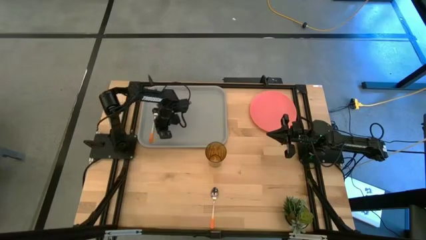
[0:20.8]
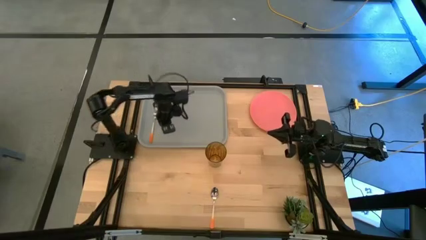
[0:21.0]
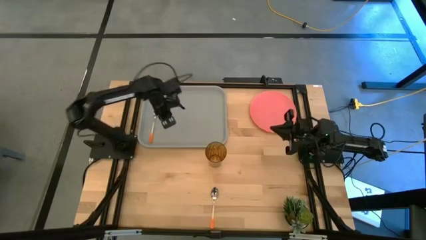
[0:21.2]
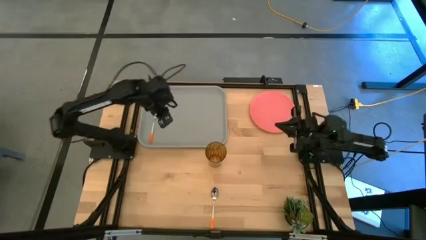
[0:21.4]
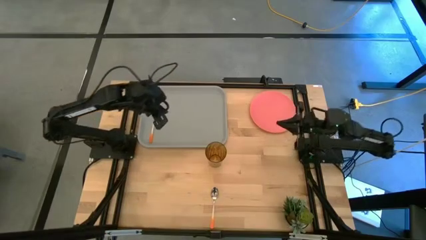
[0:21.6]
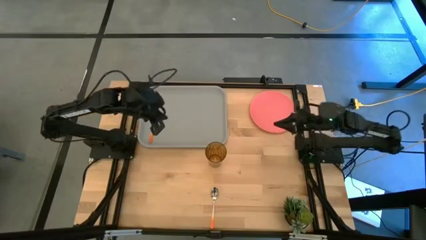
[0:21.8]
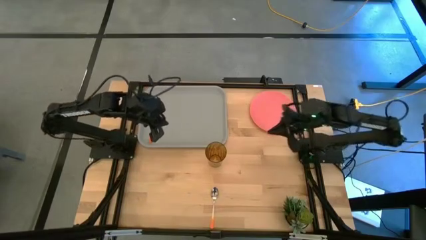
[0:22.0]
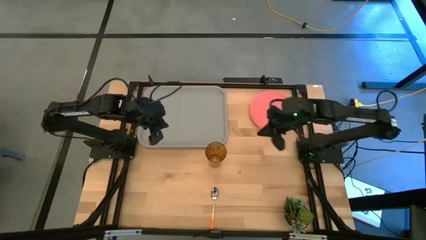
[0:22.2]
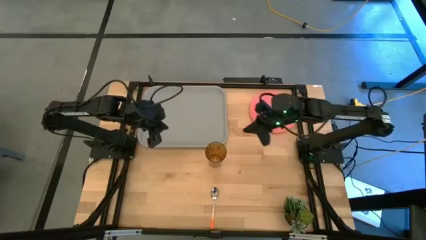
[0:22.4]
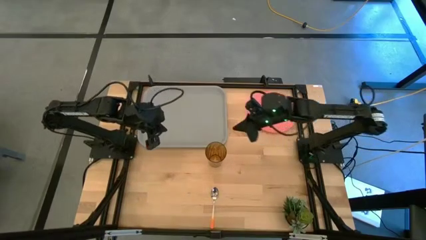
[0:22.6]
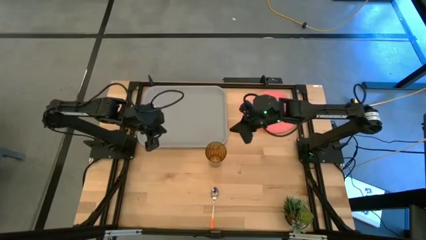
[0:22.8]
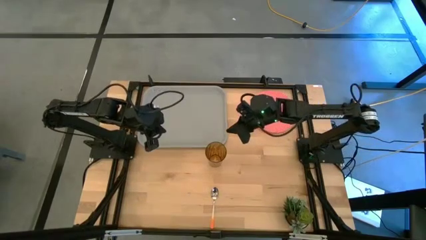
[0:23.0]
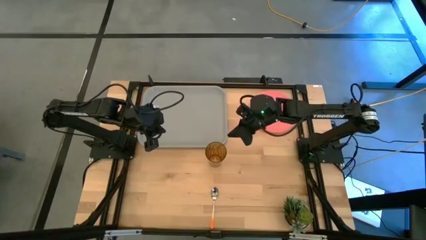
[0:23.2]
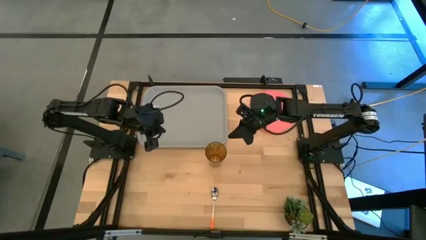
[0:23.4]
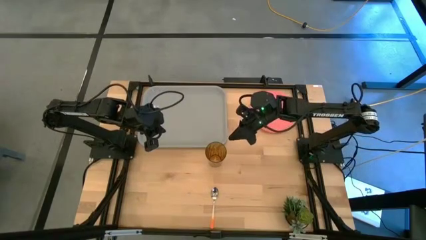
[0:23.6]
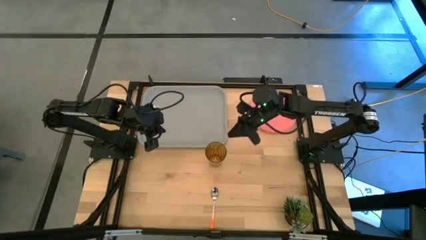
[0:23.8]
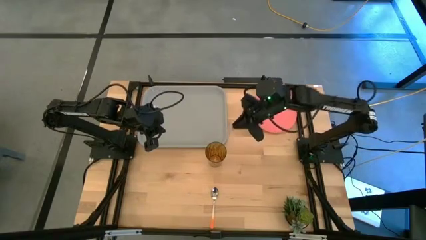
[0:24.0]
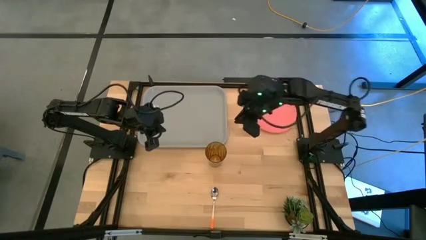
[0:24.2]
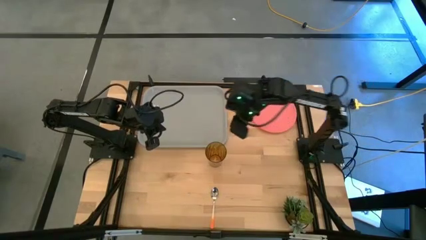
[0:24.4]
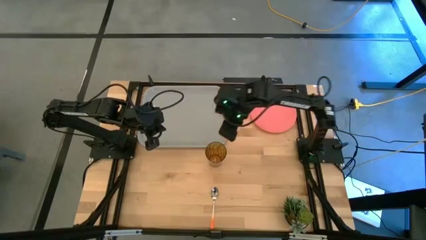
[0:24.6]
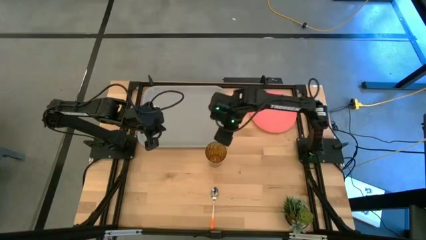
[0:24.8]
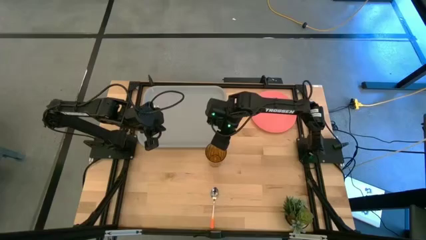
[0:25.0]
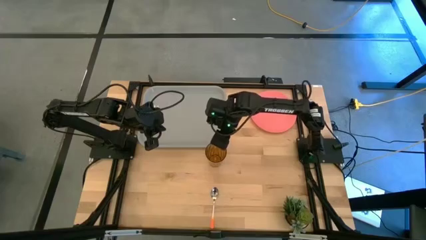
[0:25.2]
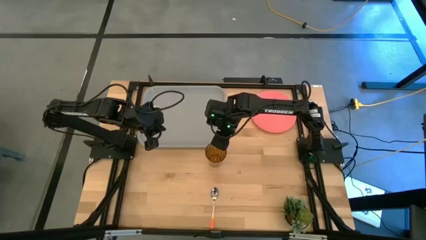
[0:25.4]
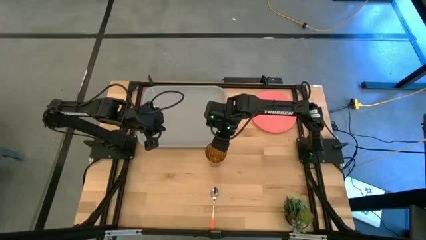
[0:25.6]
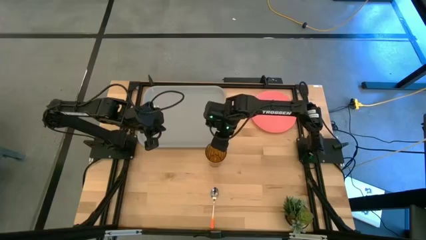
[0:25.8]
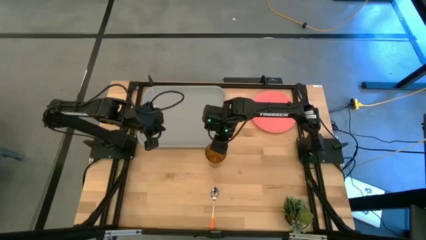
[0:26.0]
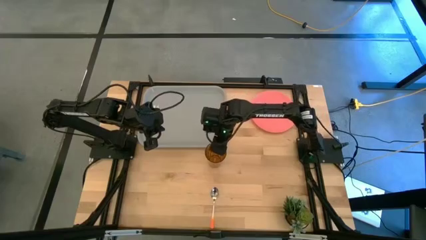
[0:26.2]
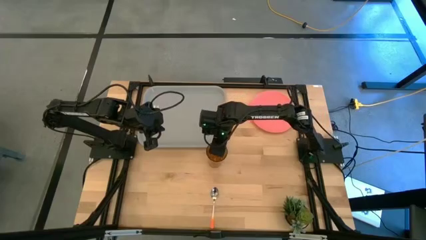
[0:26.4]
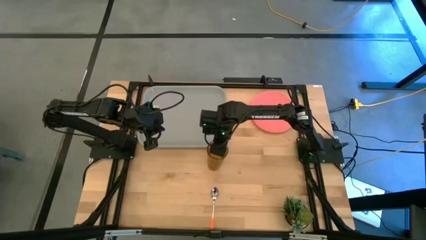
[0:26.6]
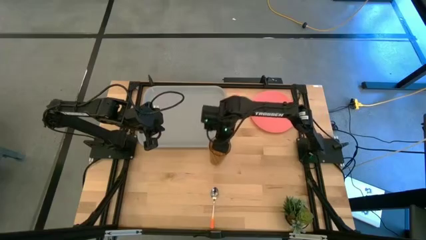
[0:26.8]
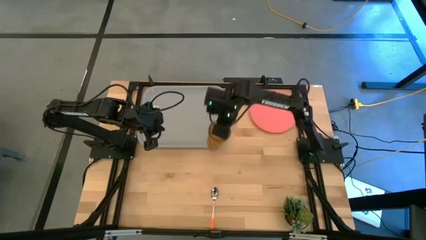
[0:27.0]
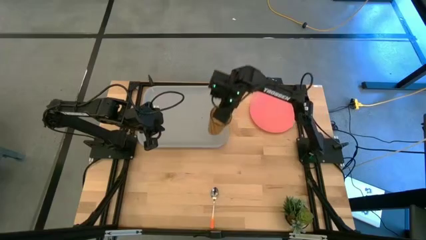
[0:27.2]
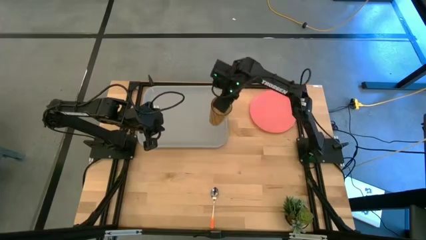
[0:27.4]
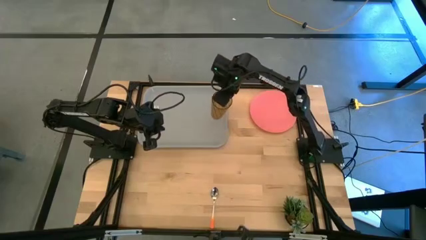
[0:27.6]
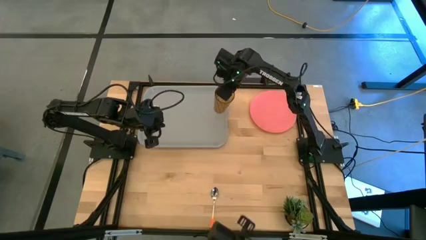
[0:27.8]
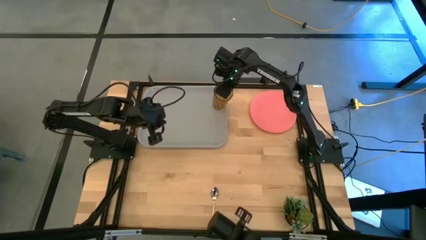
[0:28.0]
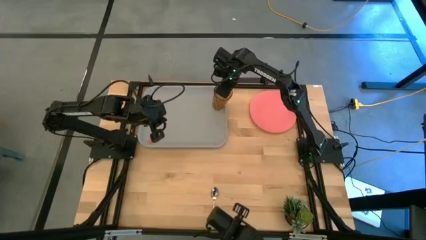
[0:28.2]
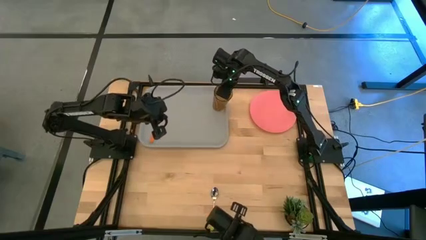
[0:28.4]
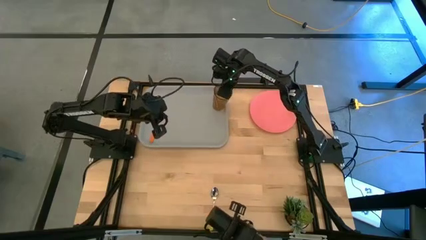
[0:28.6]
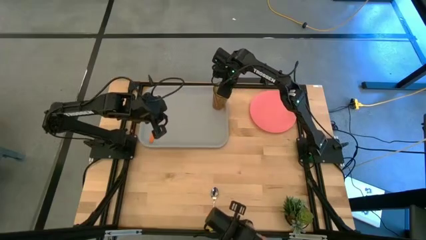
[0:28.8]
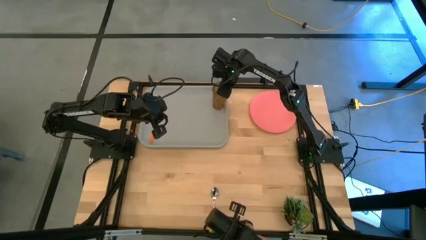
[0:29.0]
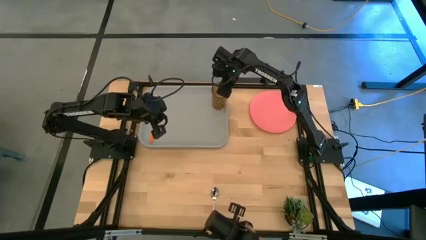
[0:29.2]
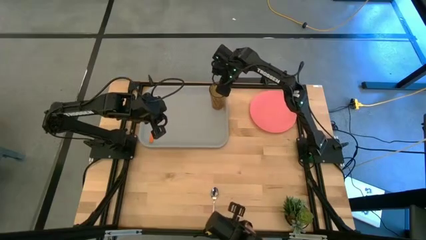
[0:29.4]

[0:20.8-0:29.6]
Task: Pick and place plate/cup/fork/spoon on tray
Put the orange cup to the top of the orange fork on the gray serving tray

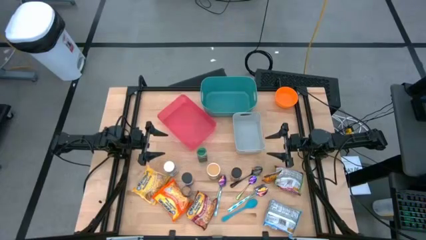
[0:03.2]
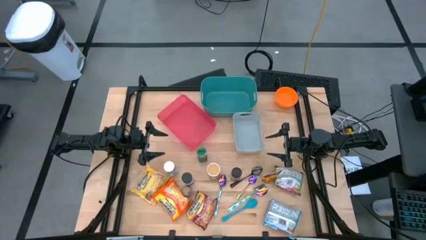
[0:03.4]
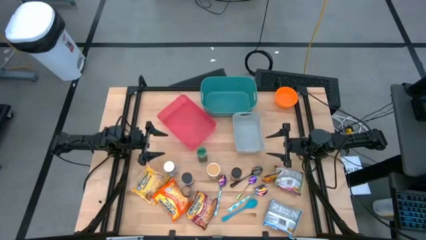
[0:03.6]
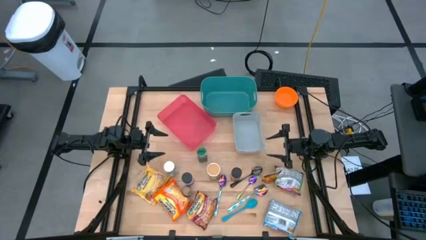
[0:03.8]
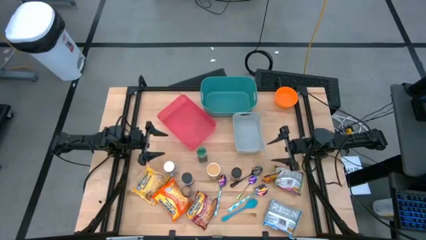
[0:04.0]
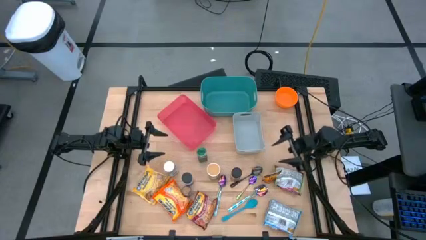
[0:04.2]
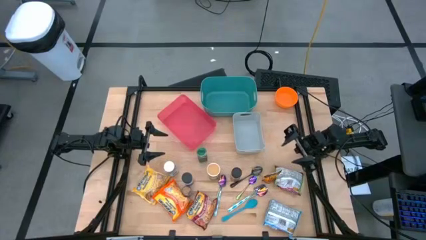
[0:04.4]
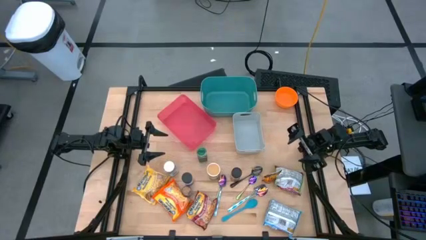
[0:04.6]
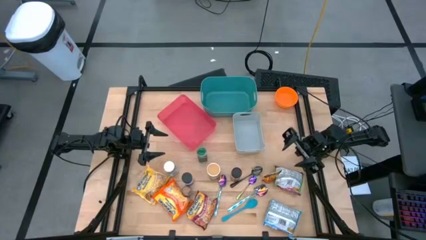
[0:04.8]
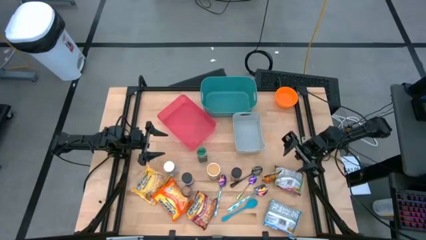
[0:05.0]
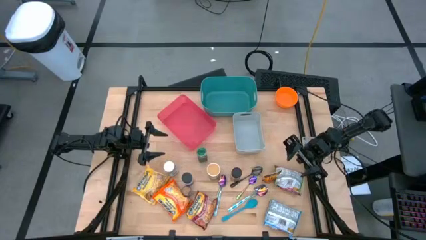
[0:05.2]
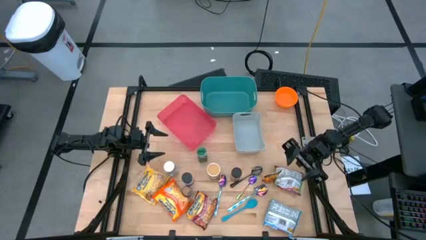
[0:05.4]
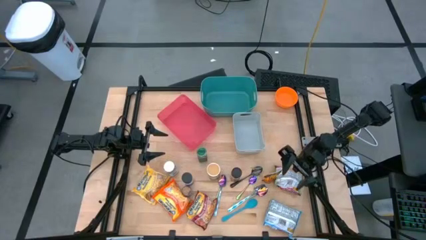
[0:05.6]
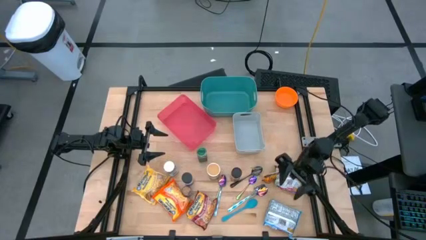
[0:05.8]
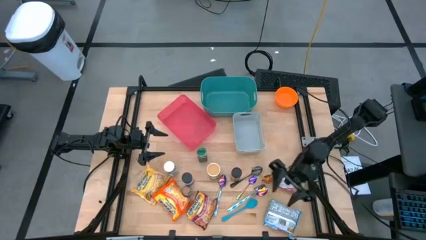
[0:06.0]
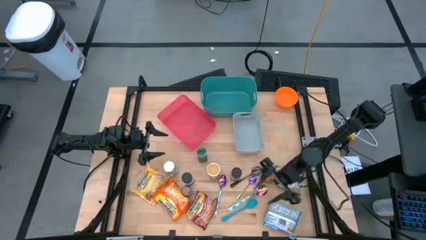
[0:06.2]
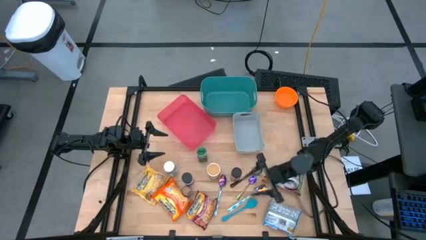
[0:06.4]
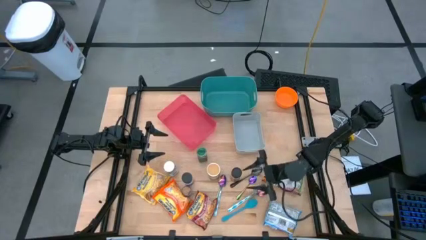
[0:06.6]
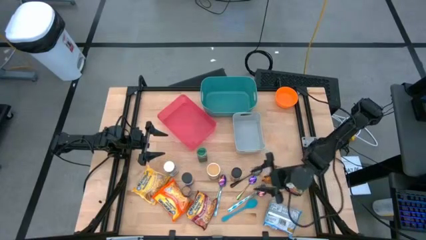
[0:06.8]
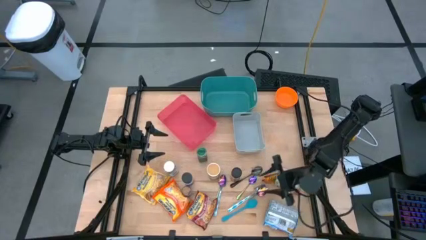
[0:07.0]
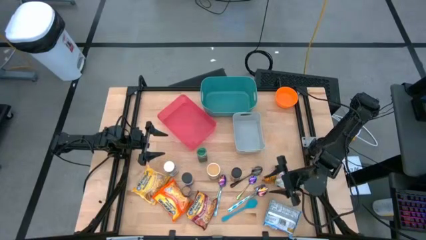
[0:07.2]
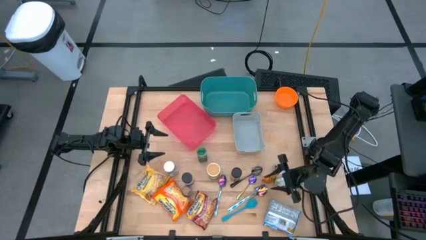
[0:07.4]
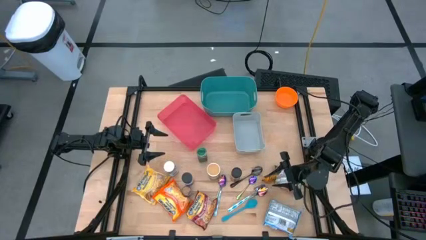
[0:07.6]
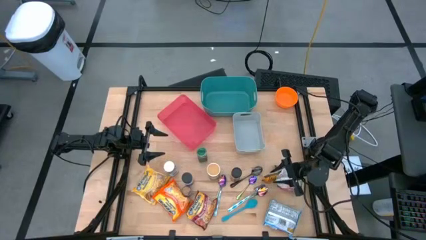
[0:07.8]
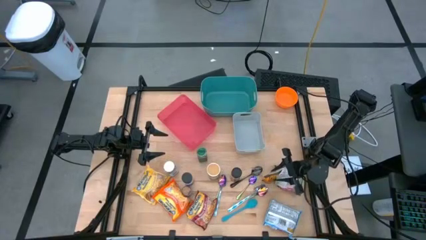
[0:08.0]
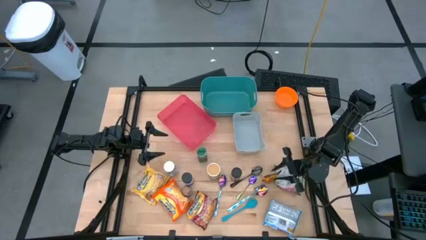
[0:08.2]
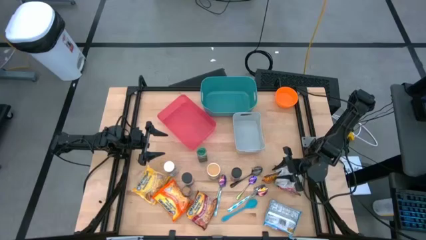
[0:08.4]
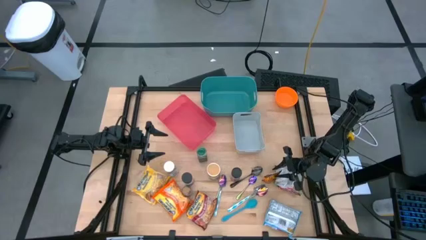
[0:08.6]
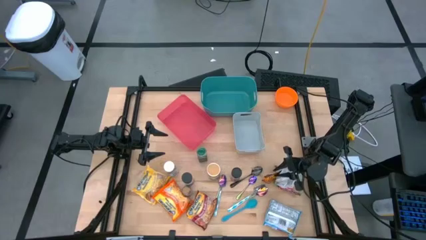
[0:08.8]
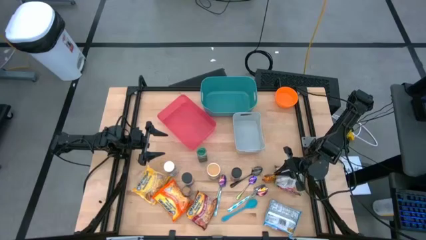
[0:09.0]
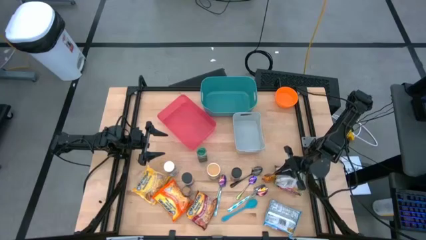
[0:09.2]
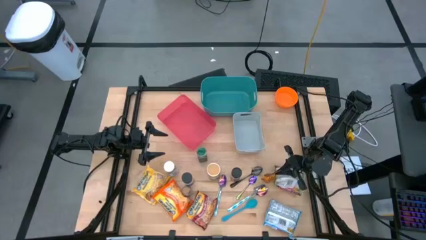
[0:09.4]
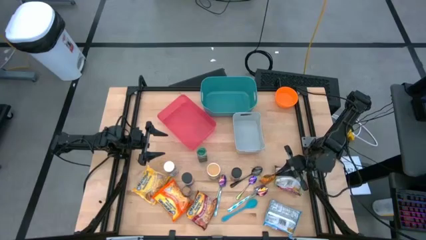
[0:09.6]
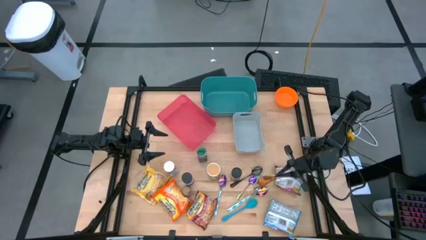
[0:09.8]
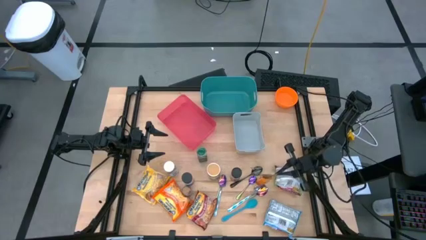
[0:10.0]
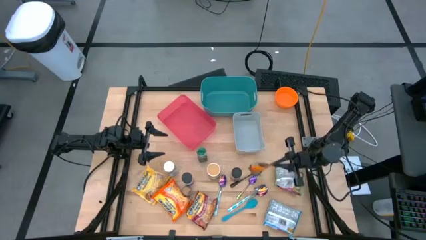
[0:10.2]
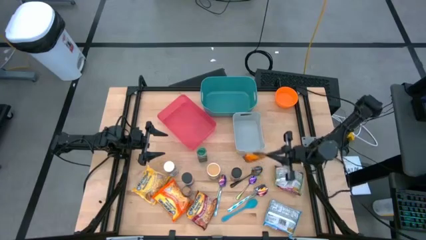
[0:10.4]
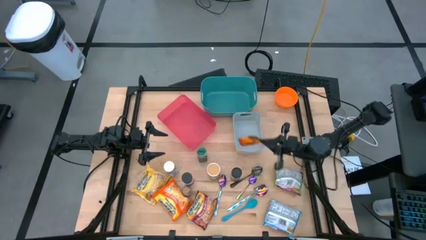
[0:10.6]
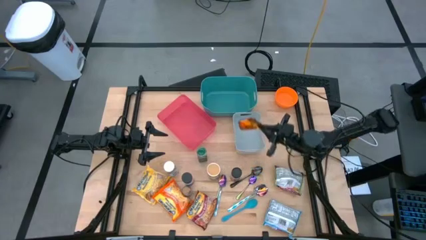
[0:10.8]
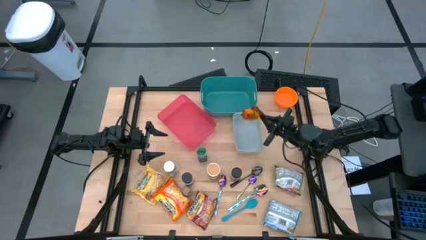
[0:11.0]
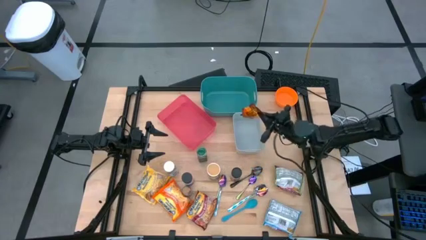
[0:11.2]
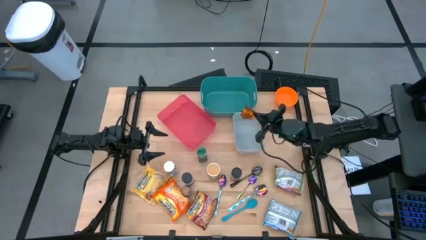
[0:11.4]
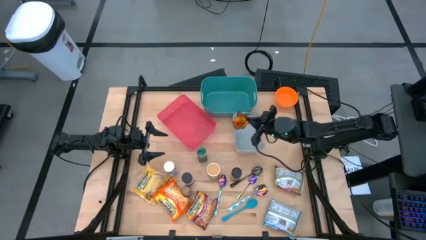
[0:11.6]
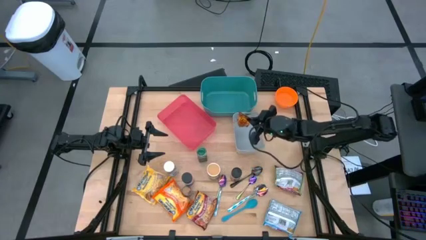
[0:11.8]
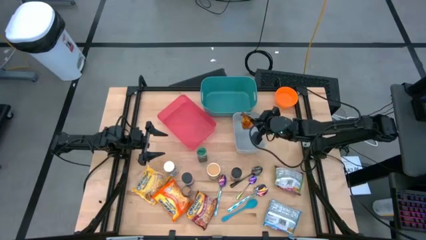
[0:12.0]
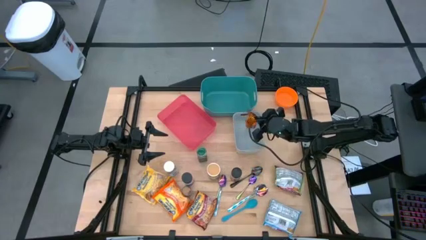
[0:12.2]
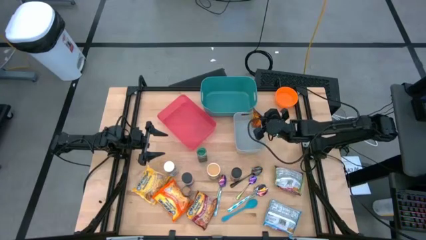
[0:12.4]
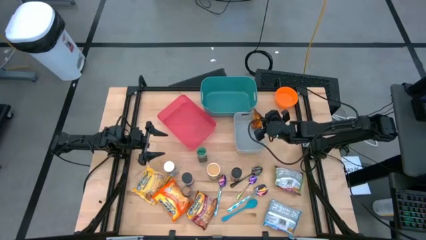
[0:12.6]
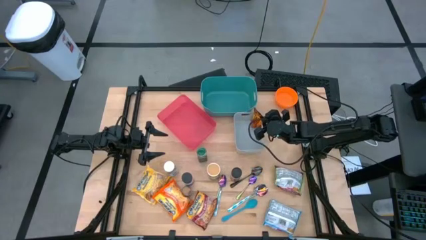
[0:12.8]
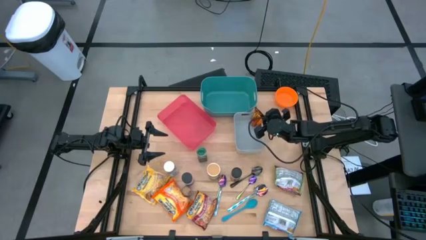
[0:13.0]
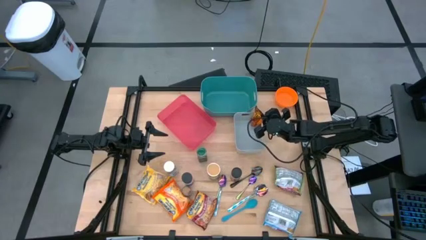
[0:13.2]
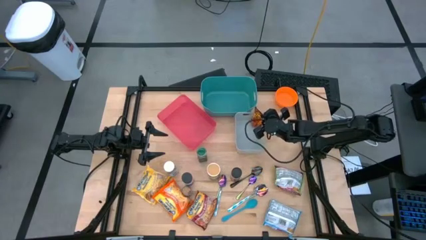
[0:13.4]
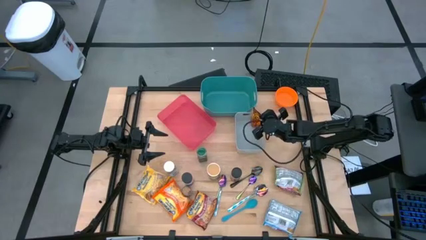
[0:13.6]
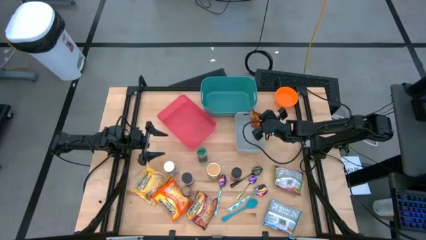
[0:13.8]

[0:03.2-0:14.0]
Task: Pick & Place Food Item
Put the orange spice pack into the gray bin
